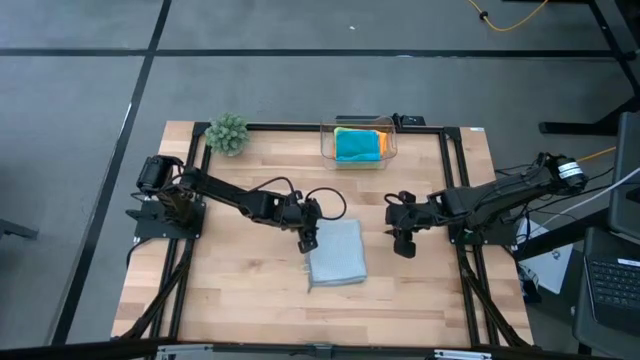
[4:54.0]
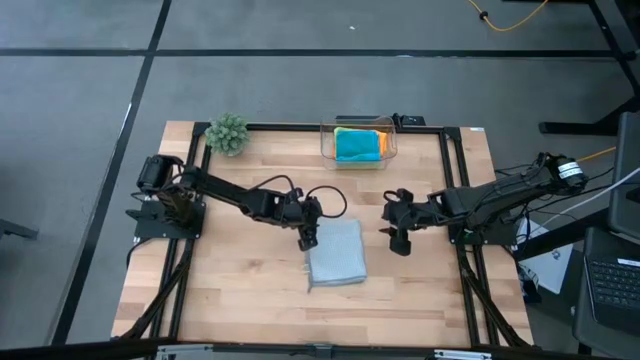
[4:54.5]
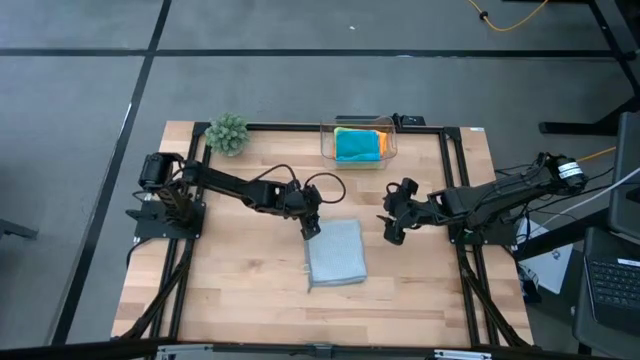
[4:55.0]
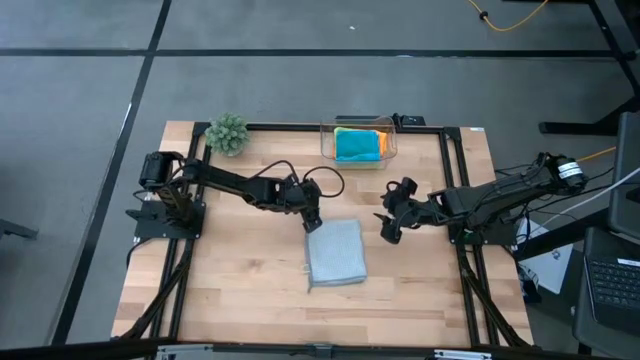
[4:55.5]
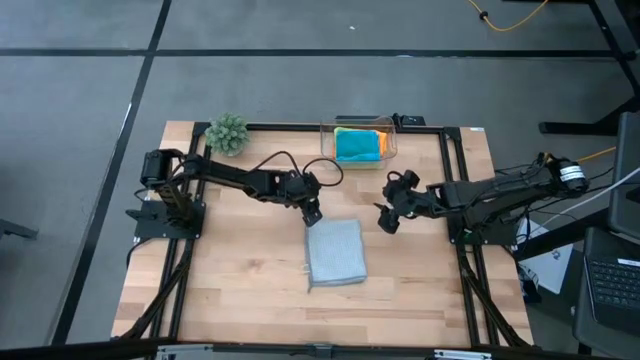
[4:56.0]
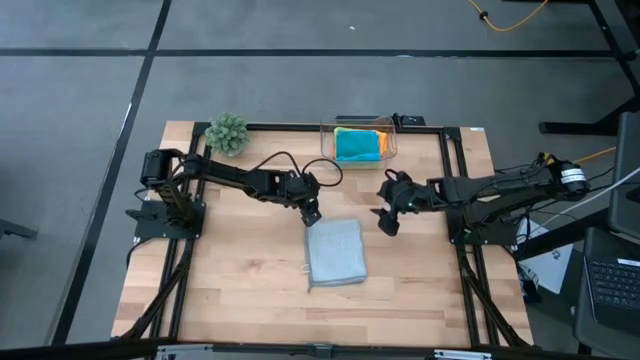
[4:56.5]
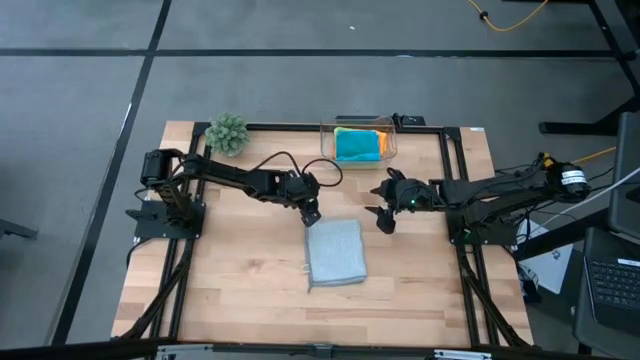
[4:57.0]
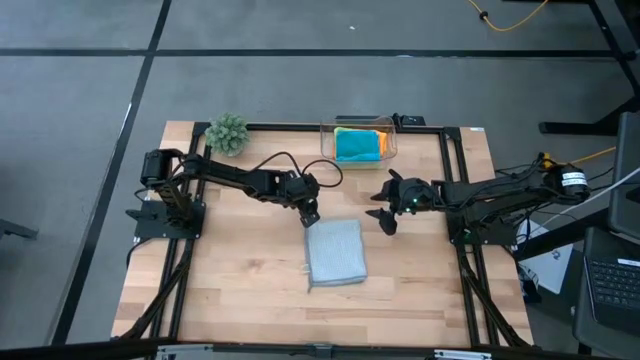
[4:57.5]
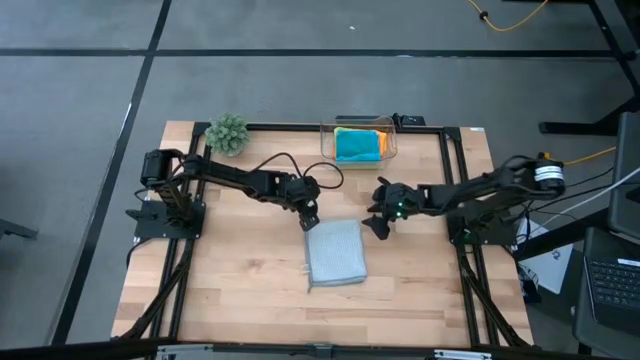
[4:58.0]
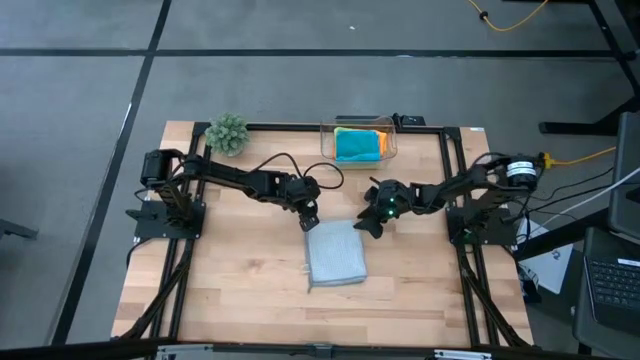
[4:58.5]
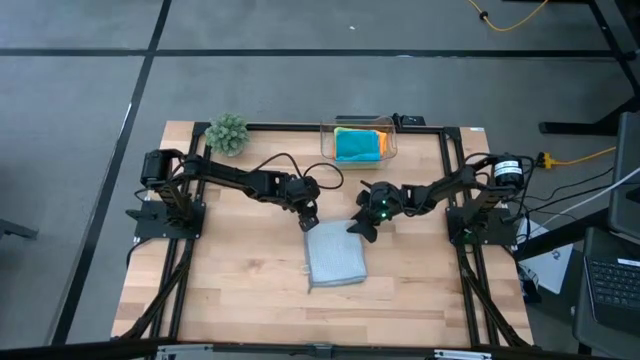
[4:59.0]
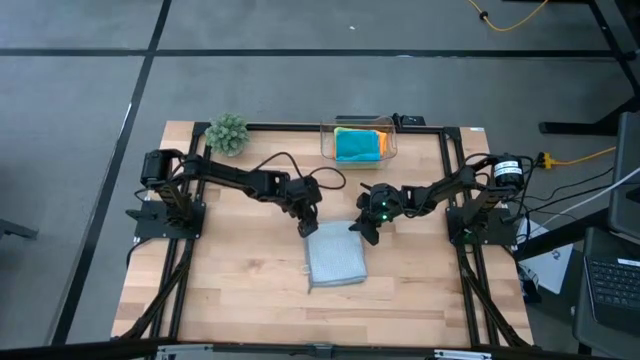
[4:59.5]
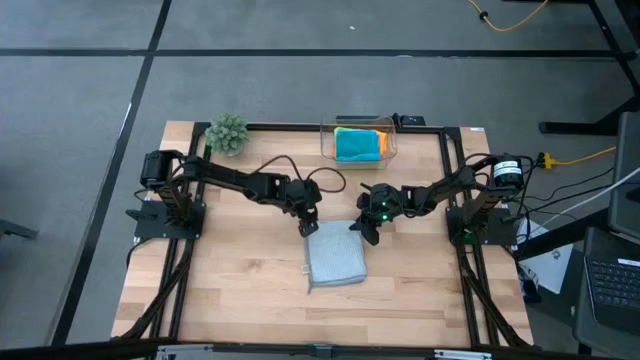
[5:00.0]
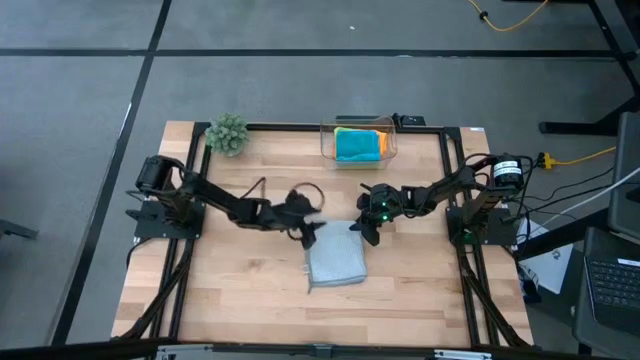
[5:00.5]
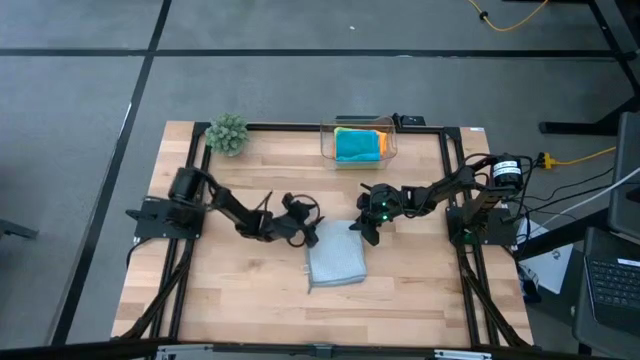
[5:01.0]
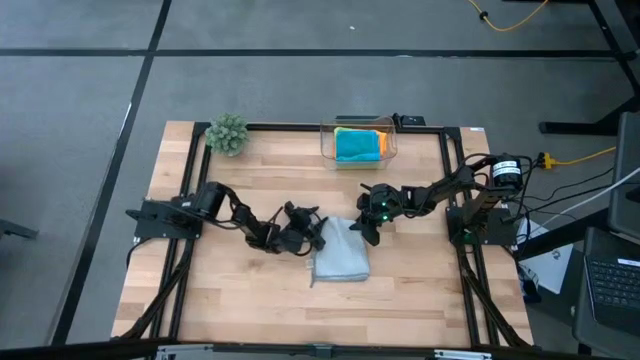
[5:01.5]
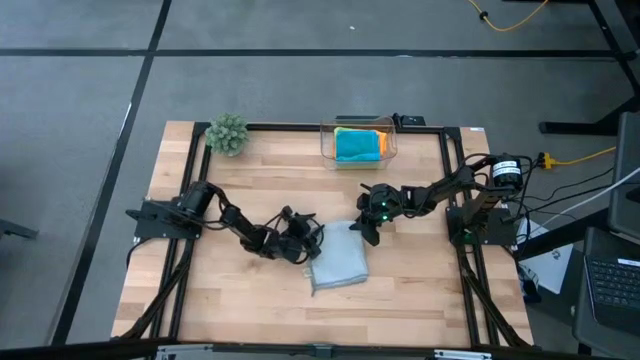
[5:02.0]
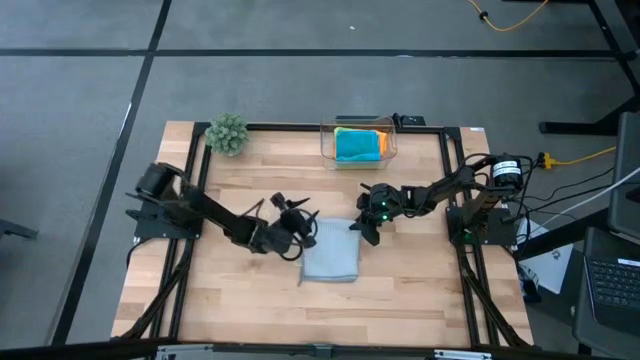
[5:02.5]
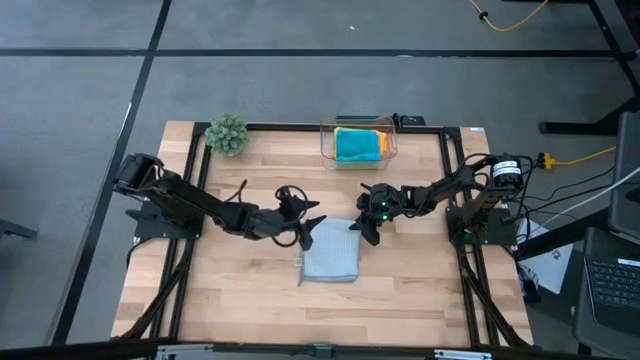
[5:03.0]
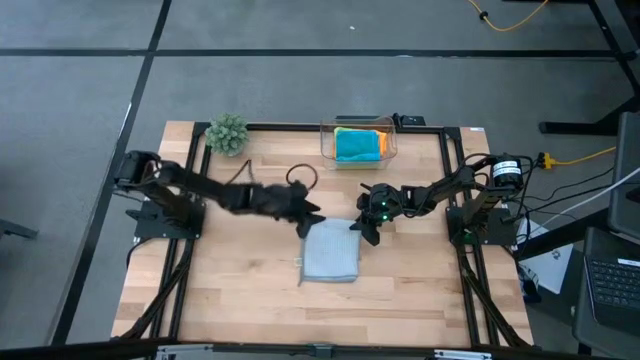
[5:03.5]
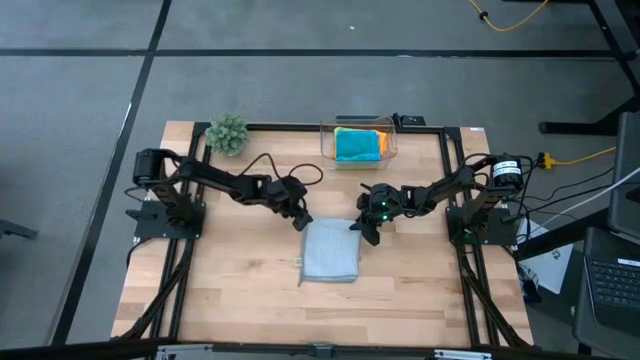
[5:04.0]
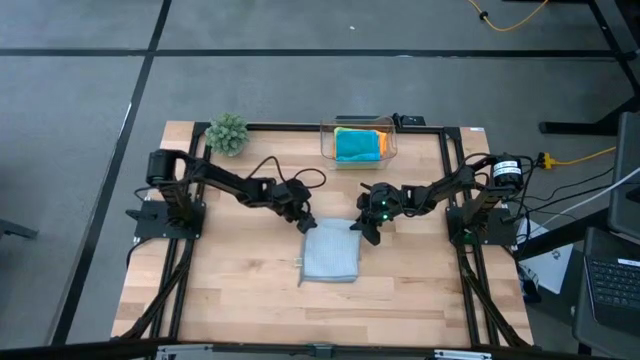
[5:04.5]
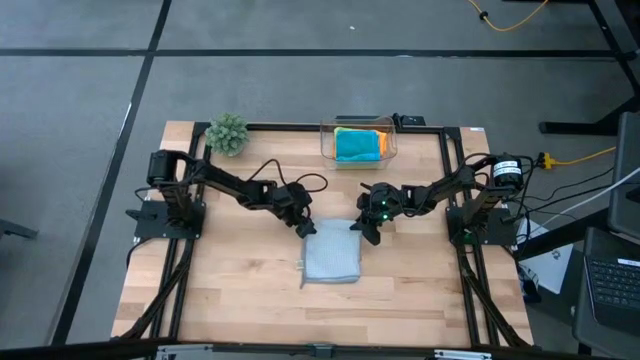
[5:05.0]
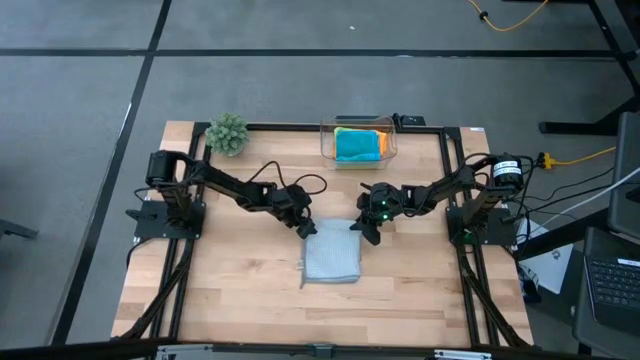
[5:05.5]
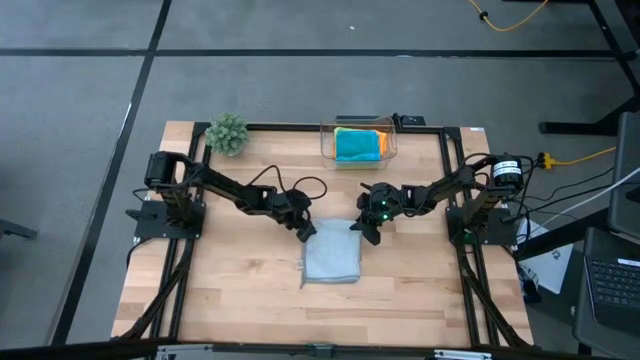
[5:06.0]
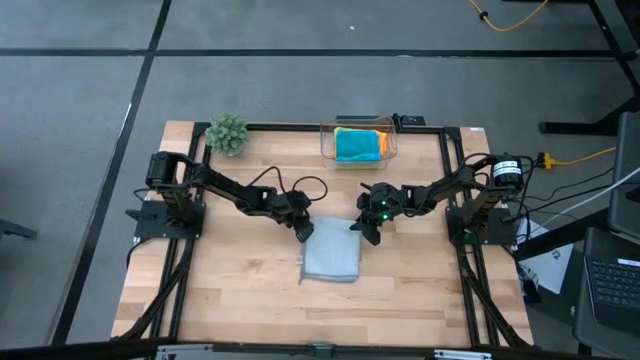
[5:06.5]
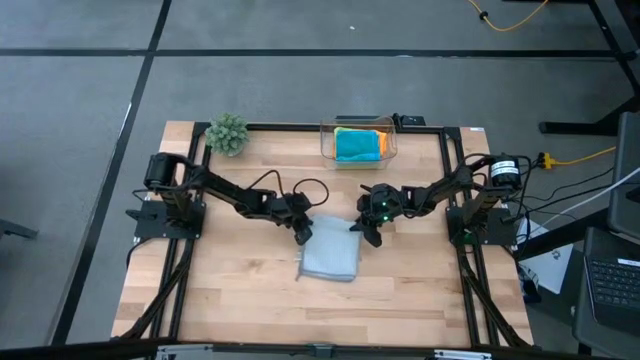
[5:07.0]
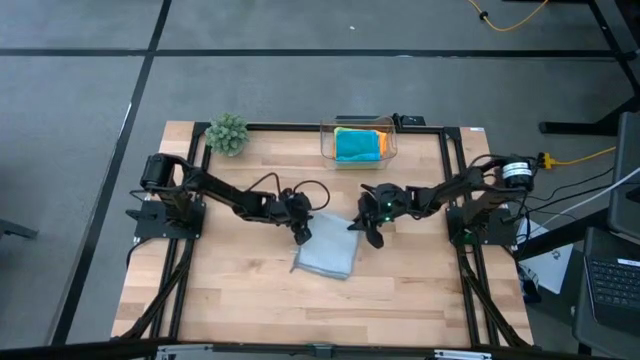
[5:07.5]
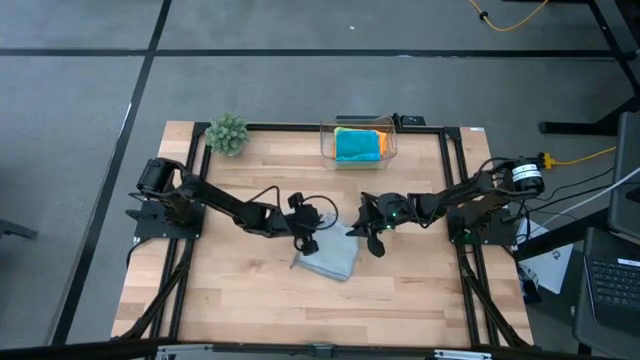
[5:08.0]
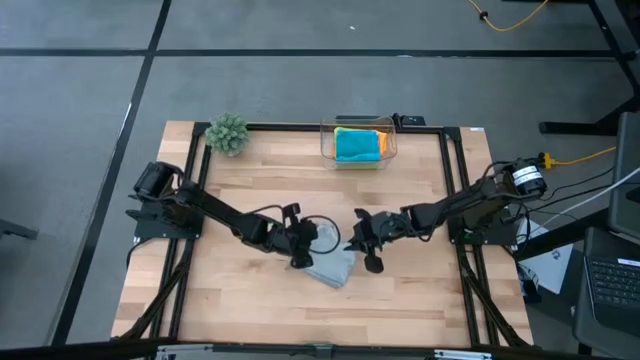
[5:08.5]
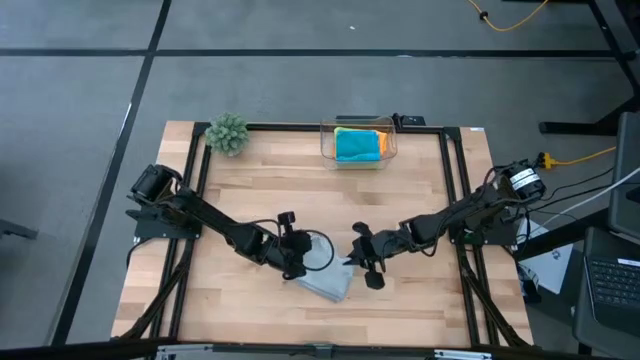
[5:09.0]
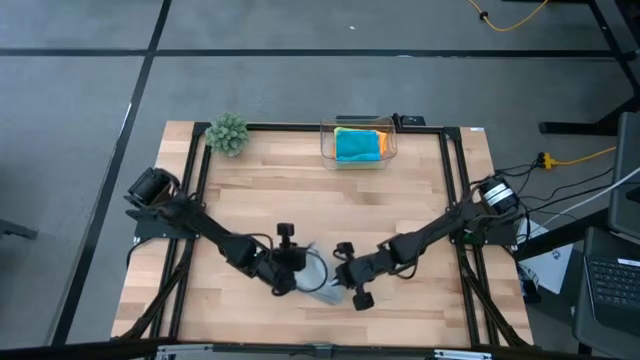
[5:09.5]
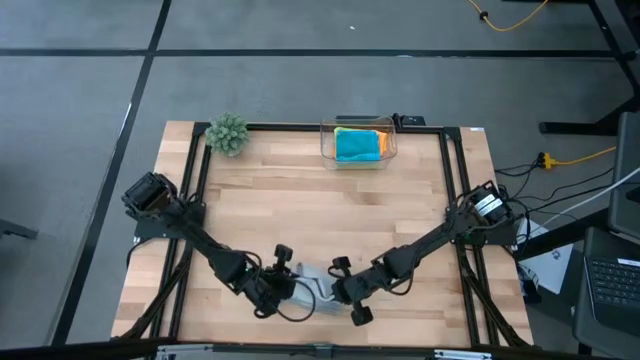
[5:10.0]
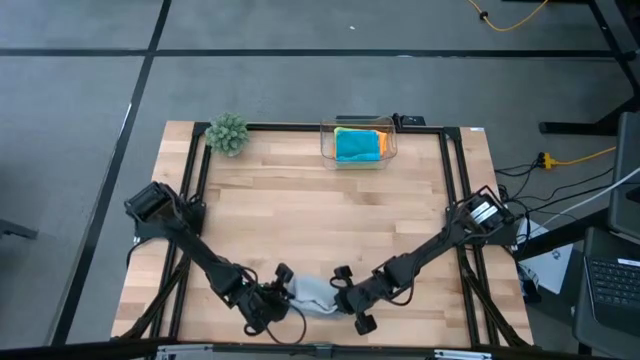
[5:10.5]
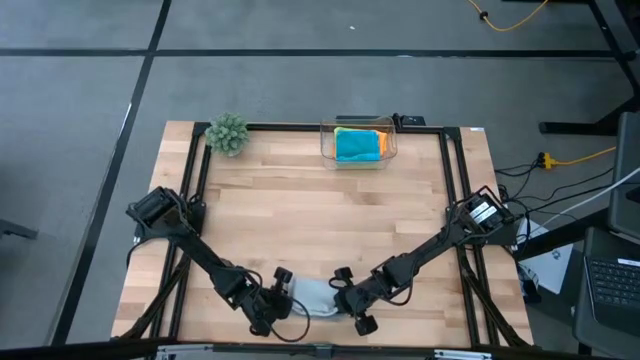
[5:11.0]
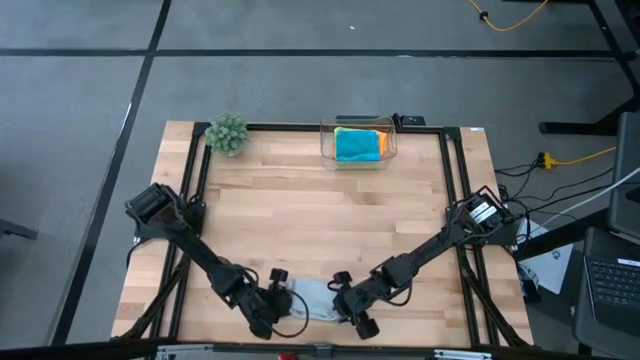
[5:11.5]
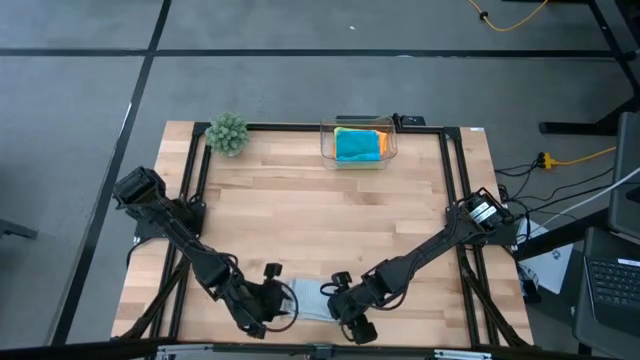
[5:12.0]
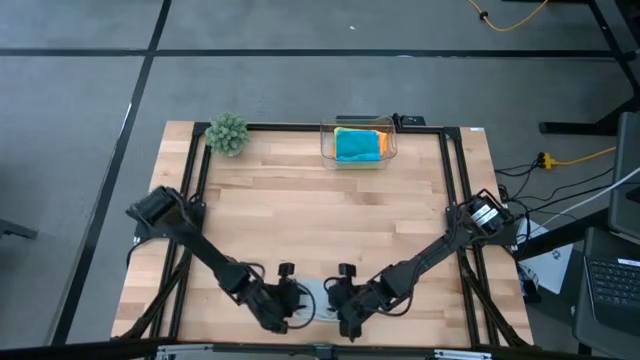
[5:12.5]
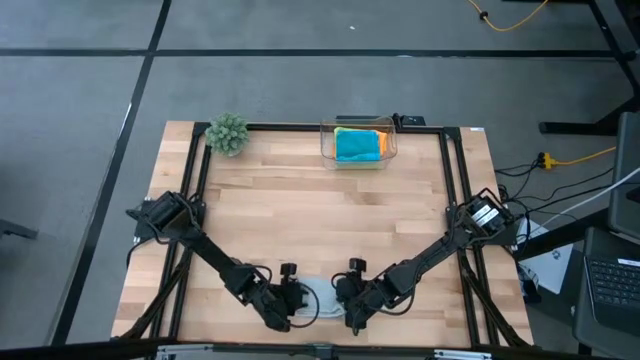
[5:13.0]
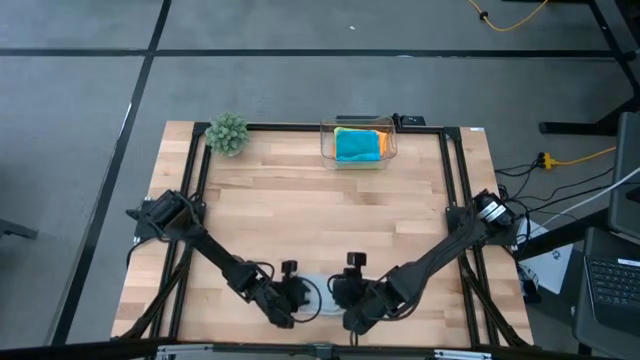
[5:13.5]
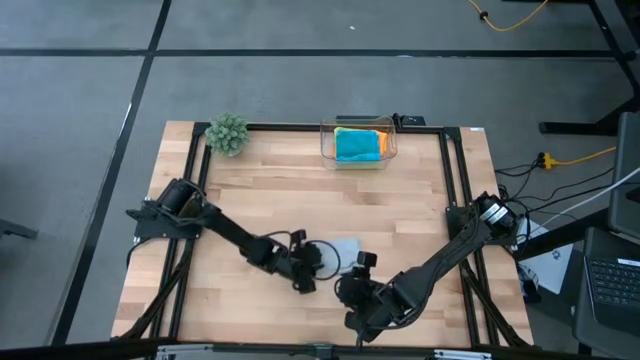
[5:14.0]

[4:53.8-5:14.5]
Task: Fold microfiber towels
Fold the gray microfiber cloth
